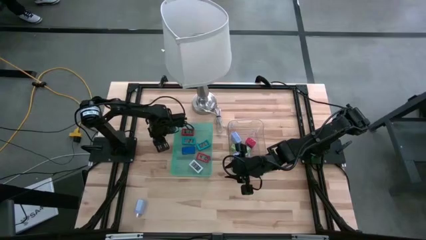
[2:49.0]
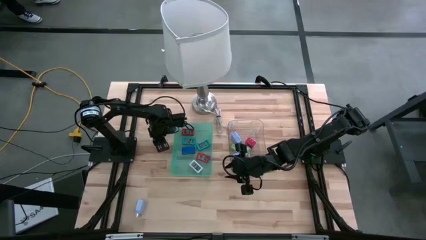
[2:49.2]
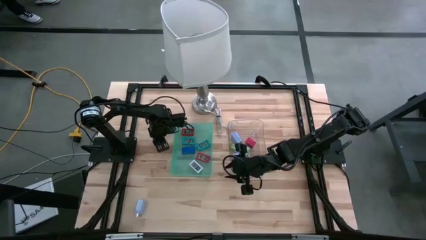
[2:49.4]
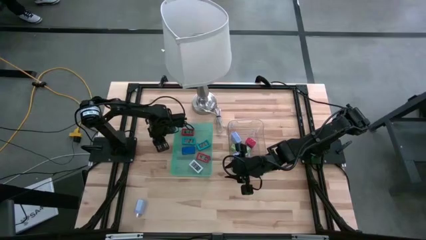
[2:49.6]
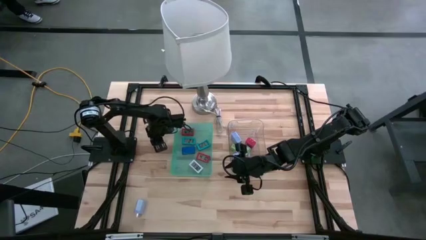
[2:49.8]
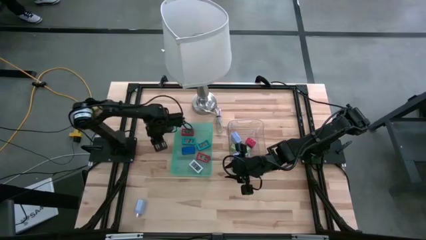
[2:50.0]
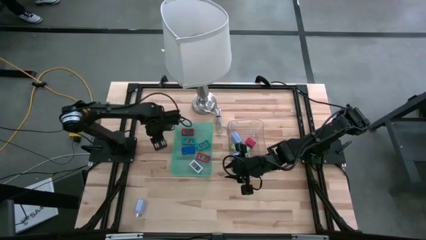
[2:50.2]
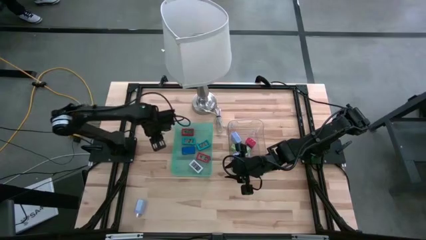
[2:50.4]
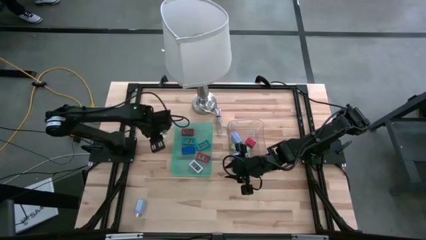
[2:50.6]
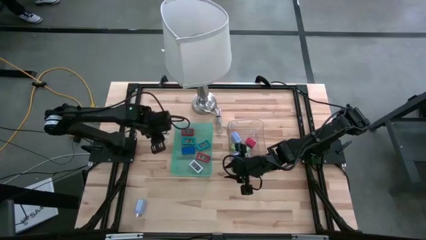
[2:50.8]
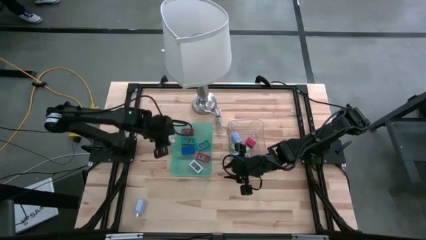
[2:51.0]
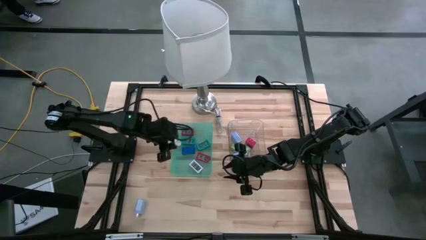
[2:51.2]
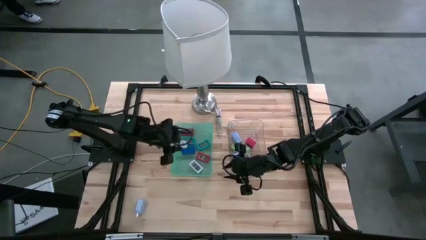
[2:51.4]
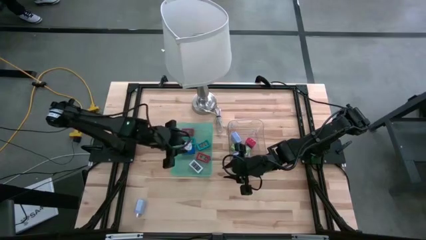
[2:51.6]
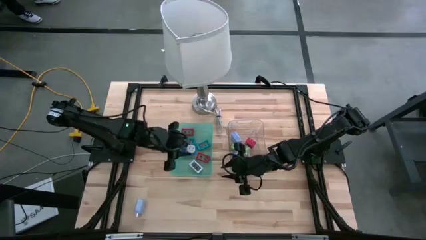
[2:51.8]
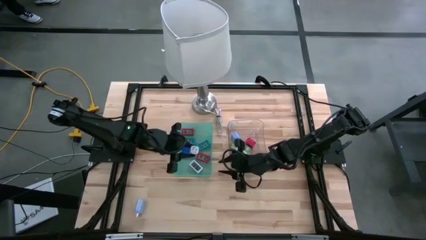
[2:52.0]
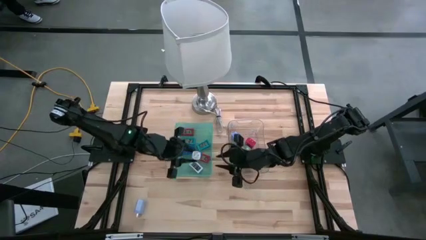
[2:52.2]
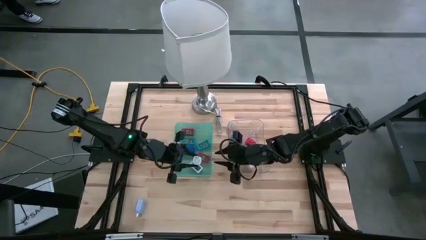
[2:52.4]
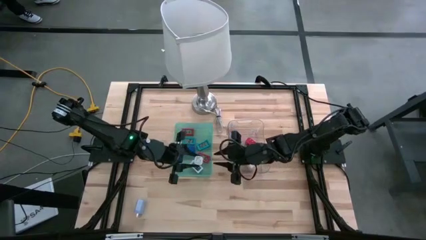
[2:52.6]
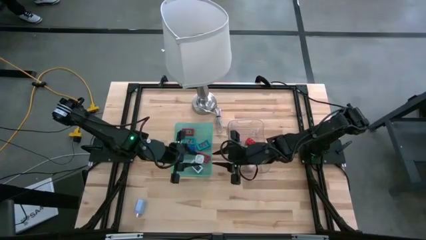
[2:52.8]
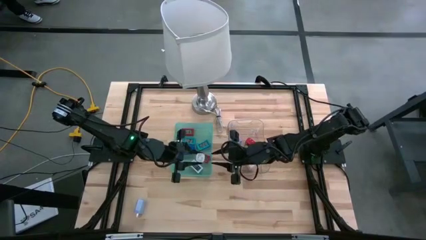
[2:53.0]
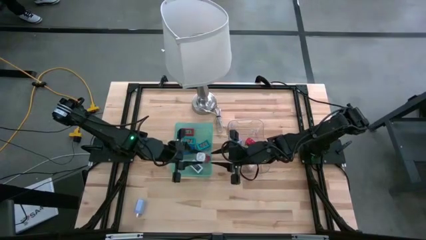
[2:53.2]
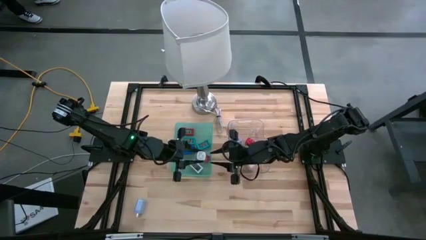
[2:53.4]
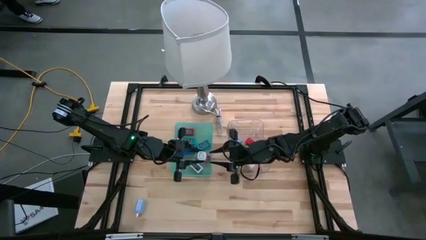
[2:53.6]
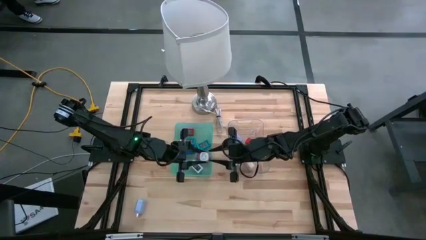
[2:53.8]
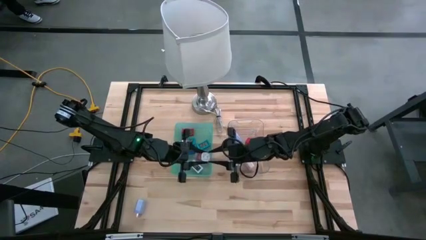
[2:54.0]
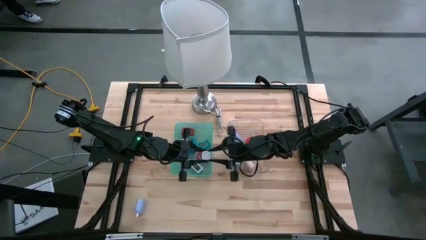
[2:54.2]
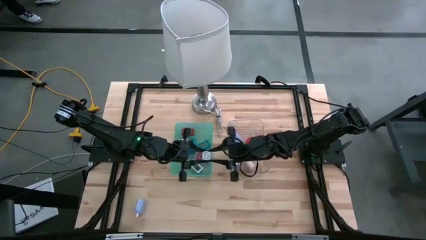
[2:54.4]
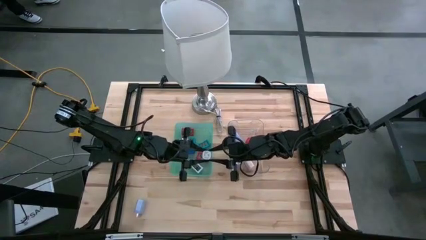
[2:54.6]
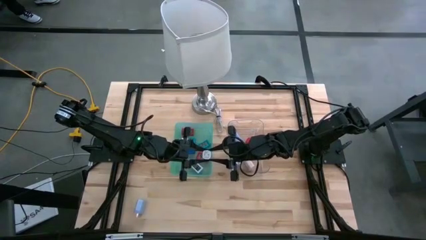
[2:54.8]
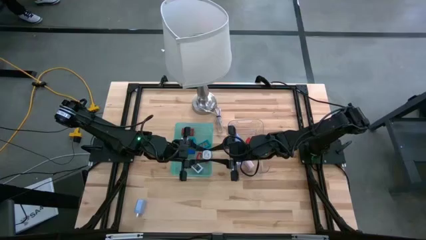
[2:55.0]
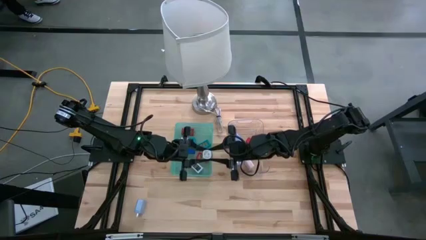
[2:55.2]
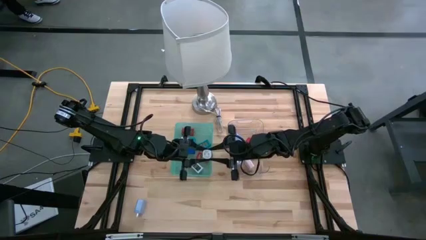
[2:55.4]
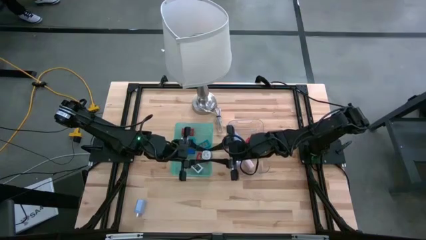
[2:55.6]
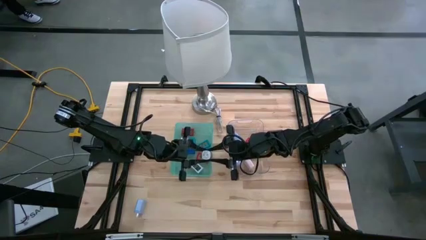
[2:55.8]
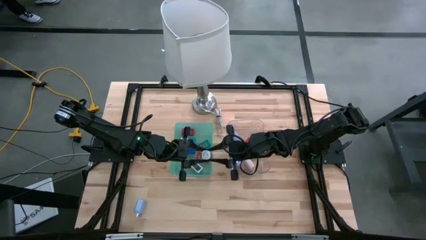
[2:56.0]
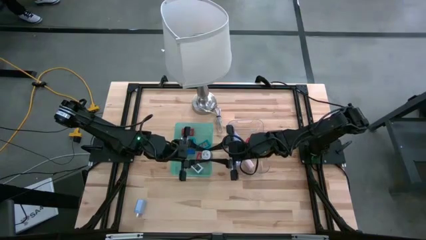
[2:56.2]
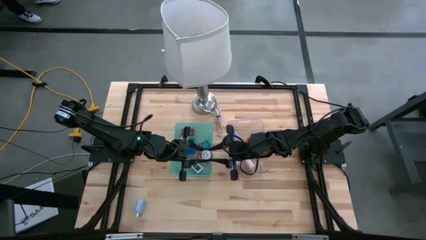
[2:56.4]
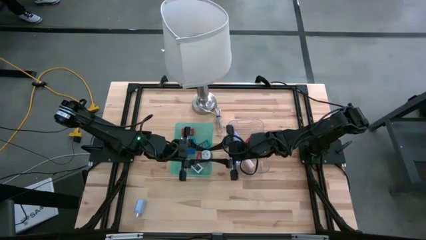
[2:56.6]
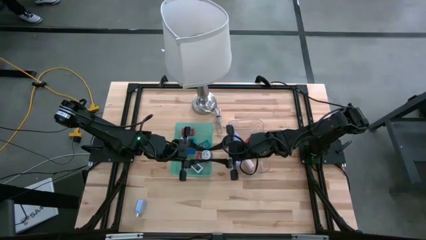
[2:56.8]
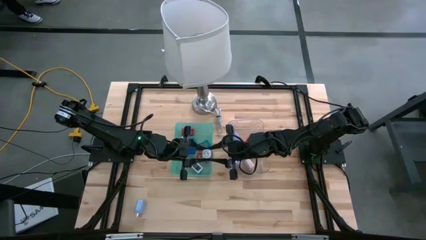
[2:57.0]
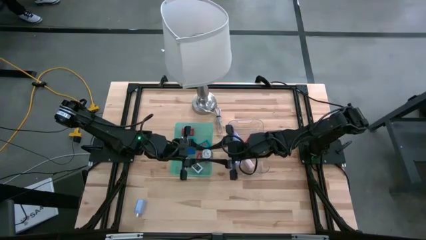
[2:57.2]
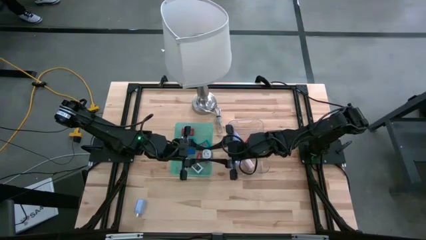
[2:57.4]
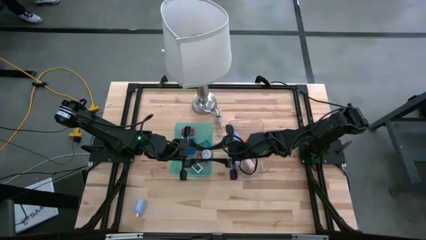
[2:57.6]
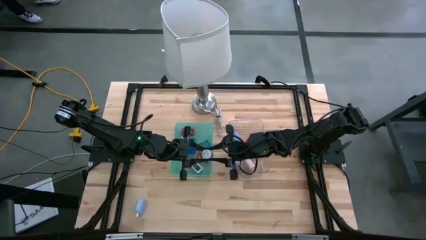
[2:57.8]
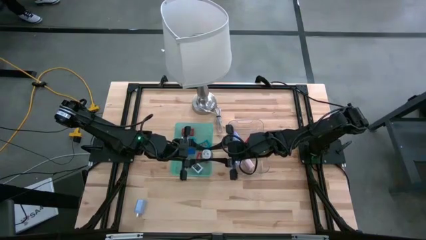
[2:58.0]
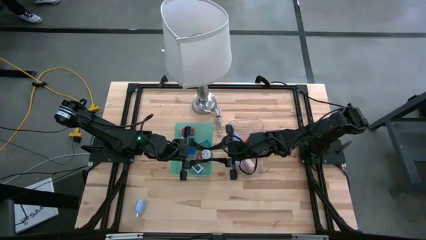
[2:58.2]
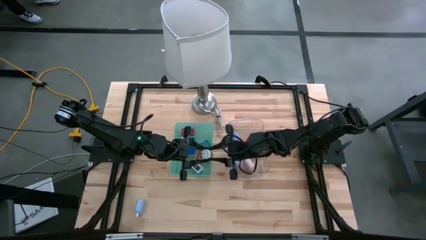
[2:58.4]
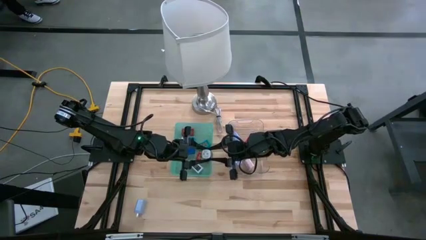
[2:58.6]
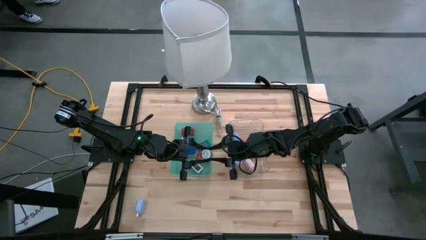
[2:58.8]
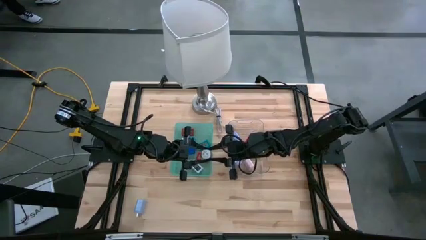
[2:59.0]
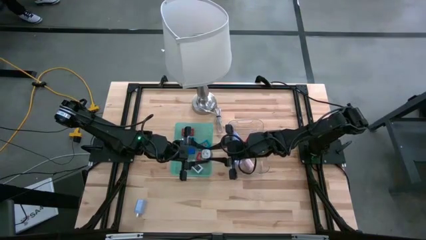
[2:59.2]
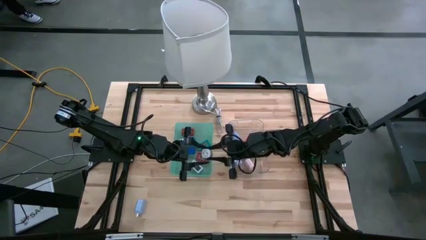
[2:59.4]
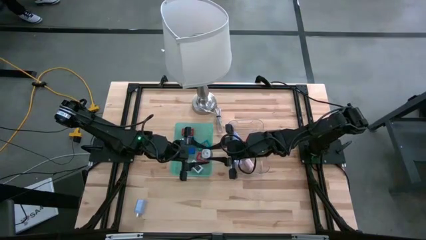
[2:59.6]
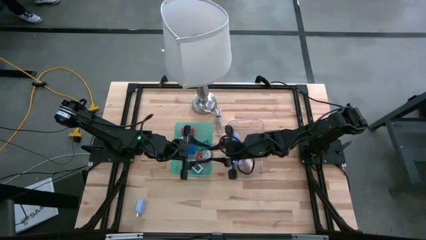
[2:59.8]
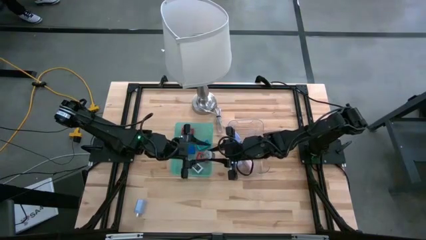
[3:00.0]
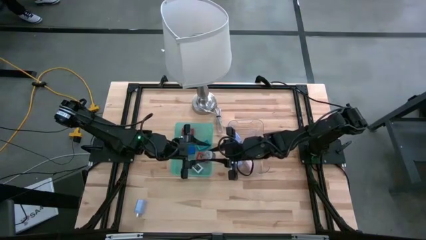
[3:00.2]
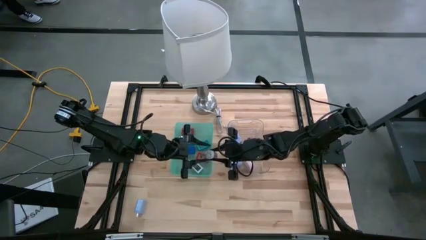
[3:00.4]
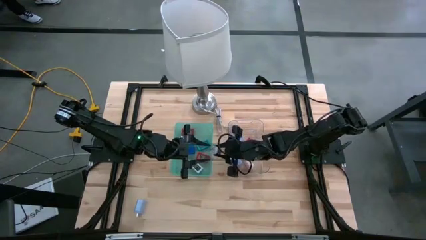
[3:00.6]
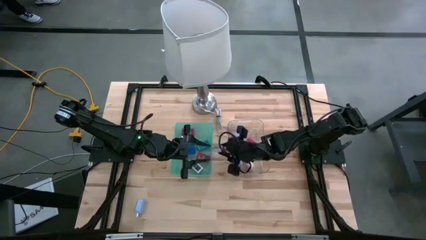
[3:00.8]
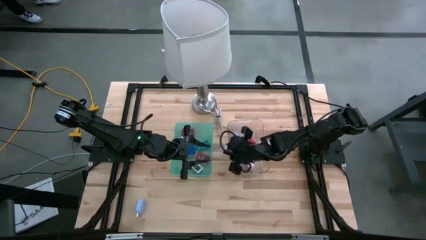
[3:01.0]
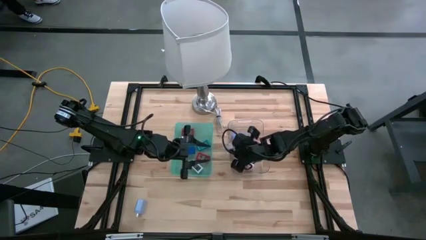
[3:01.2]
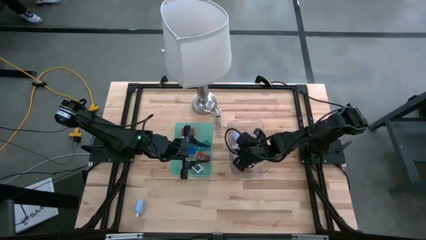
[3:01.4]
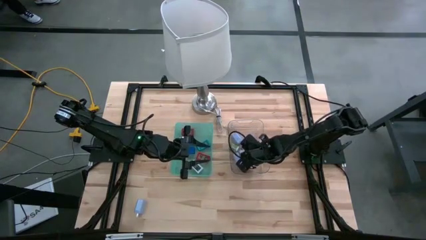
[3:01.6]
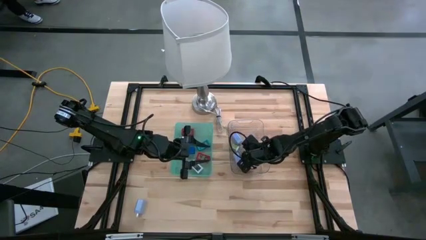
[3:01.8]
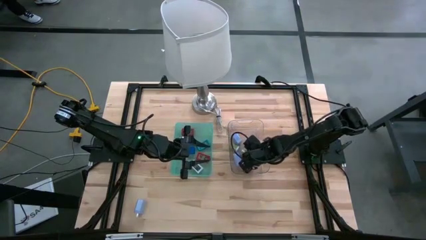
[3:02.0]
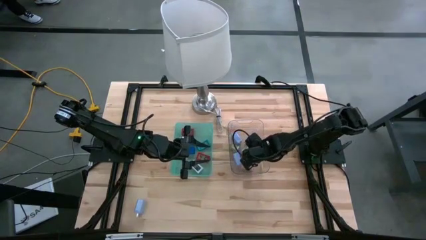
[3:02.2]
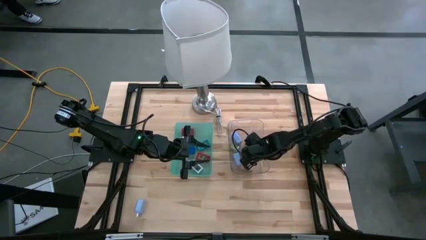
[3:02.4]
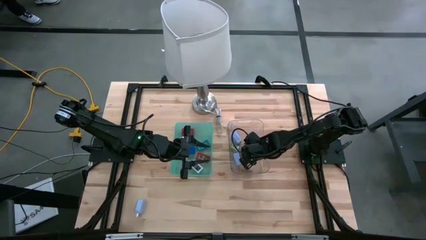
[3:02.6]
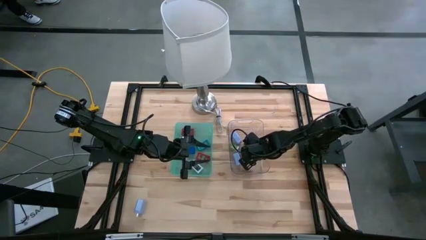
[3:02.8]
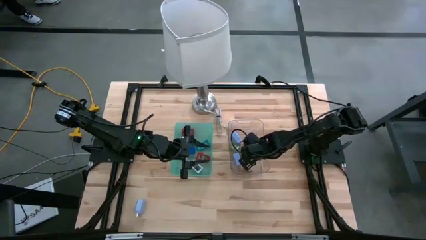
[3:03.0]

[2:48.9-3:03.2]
Task: Pick & Place Office items
Put the purple charger adapter into the transparent bin
